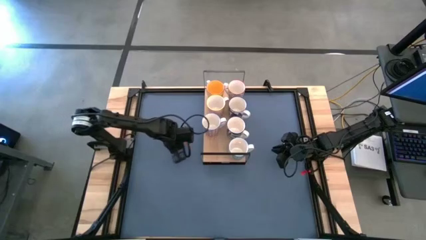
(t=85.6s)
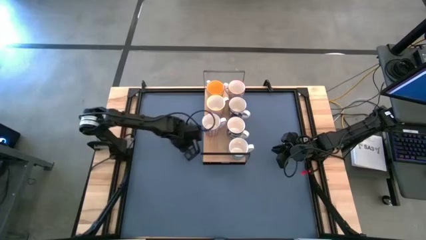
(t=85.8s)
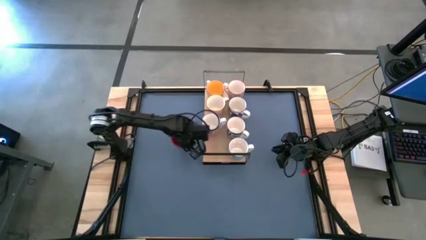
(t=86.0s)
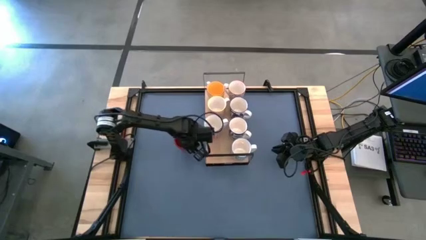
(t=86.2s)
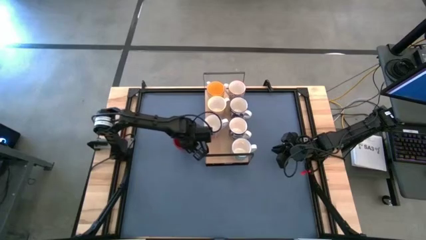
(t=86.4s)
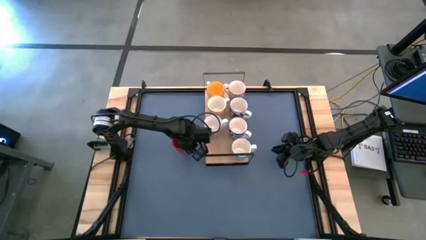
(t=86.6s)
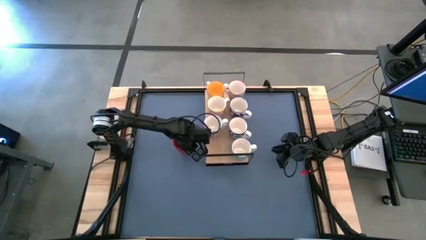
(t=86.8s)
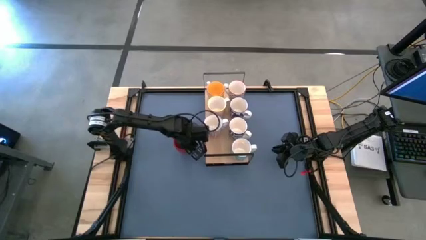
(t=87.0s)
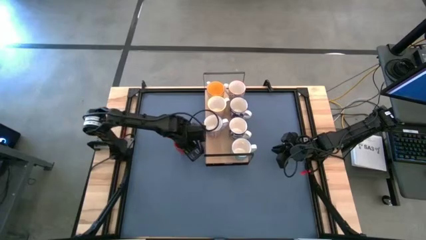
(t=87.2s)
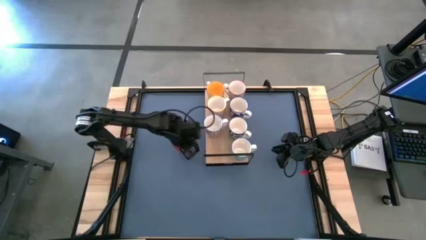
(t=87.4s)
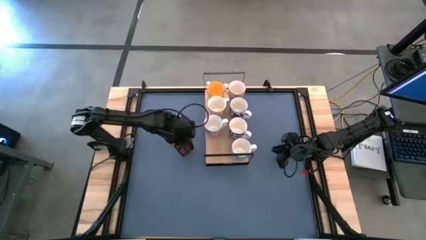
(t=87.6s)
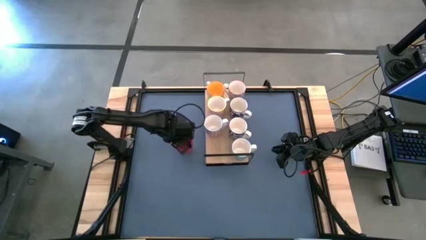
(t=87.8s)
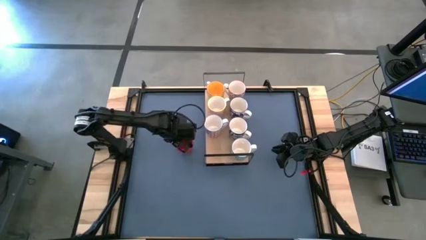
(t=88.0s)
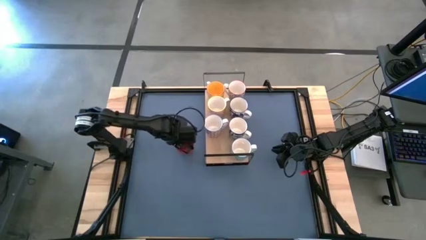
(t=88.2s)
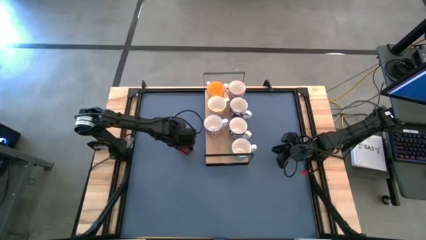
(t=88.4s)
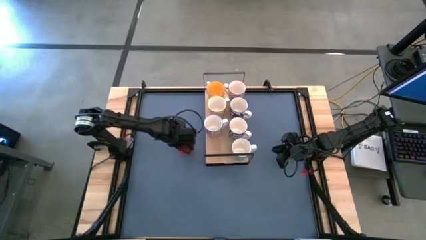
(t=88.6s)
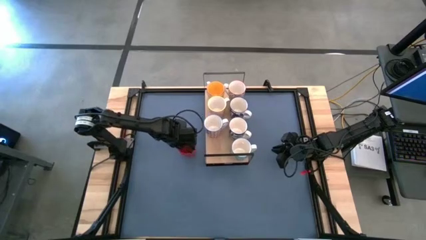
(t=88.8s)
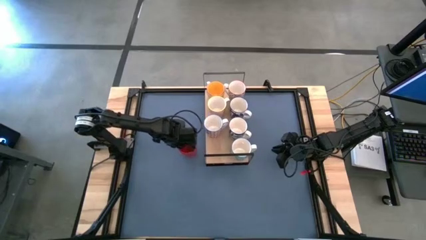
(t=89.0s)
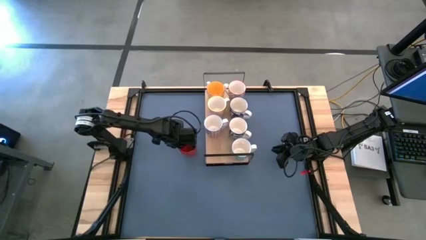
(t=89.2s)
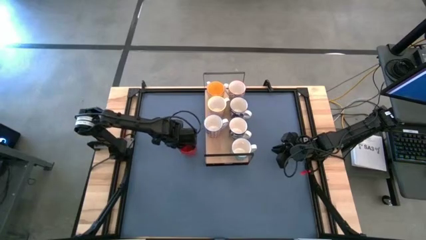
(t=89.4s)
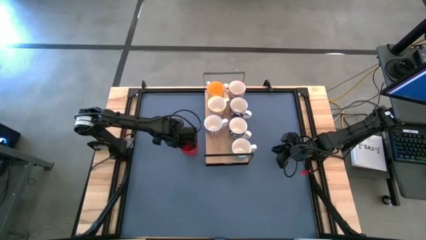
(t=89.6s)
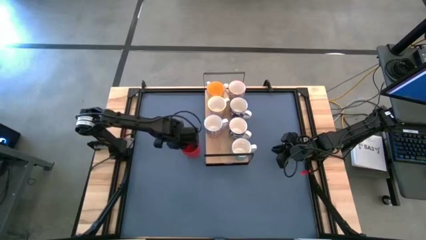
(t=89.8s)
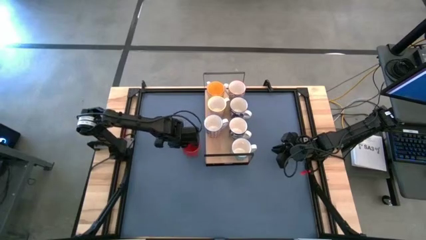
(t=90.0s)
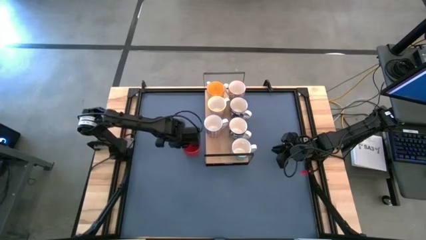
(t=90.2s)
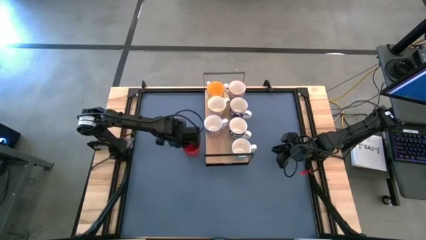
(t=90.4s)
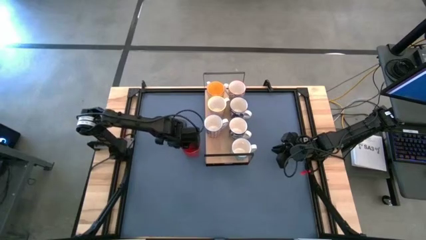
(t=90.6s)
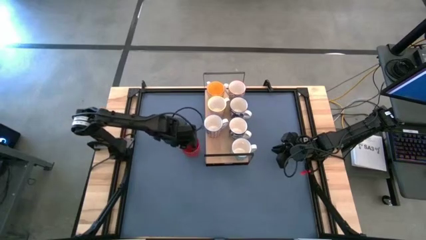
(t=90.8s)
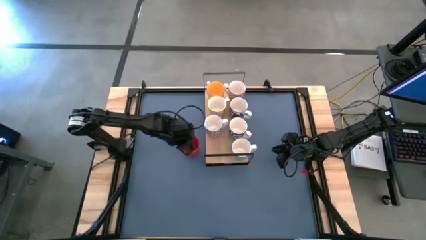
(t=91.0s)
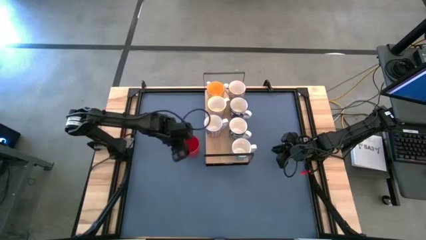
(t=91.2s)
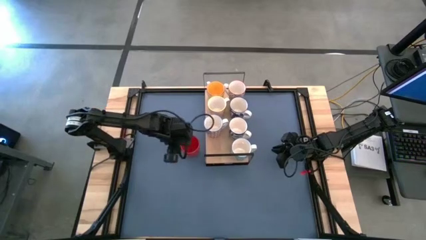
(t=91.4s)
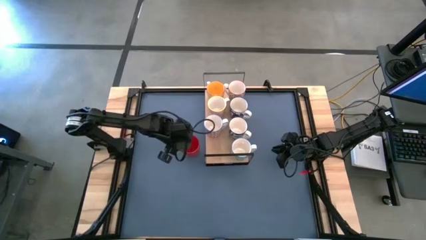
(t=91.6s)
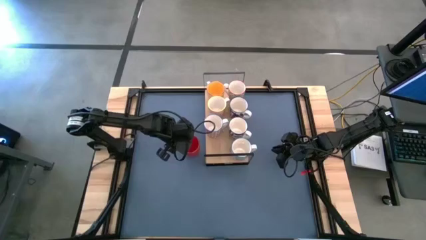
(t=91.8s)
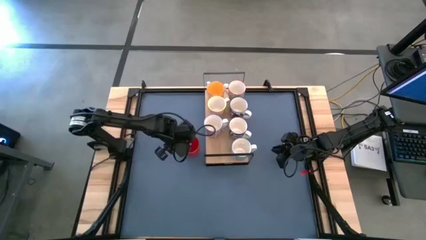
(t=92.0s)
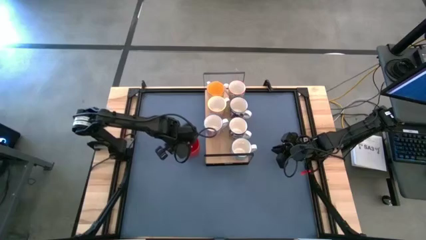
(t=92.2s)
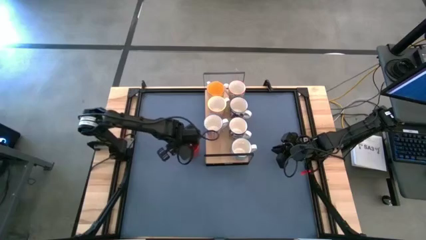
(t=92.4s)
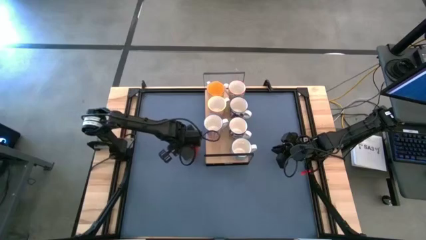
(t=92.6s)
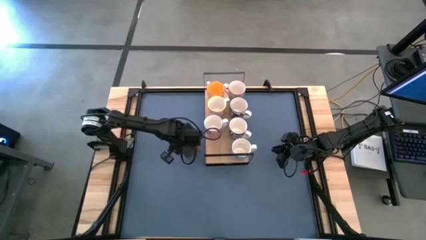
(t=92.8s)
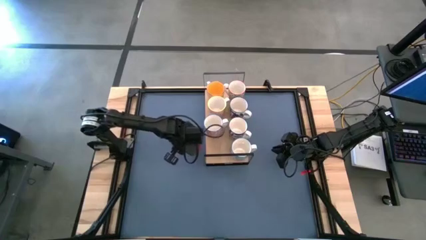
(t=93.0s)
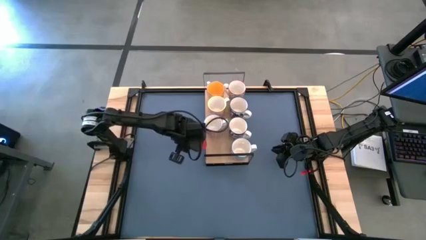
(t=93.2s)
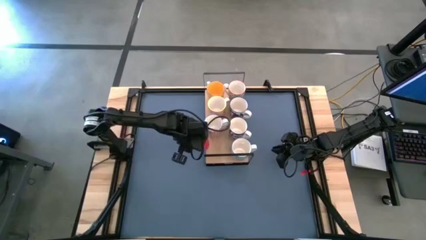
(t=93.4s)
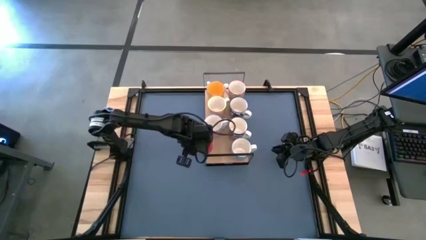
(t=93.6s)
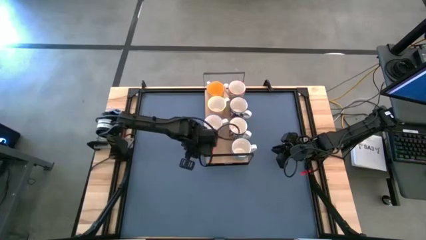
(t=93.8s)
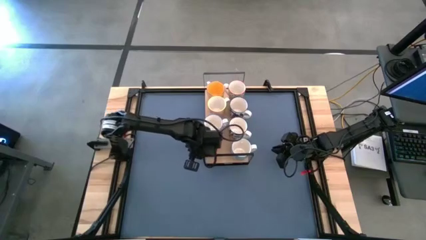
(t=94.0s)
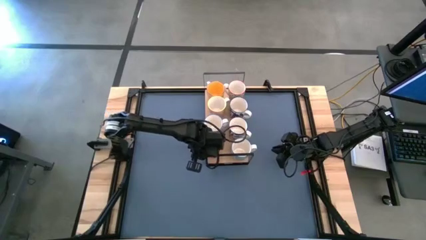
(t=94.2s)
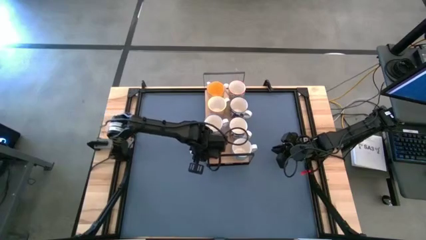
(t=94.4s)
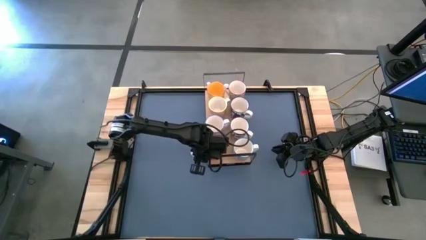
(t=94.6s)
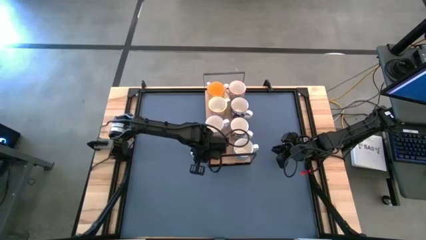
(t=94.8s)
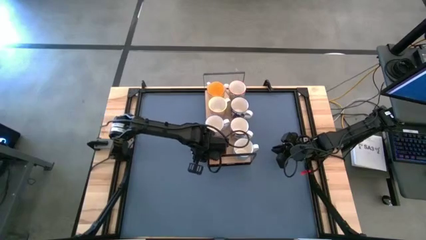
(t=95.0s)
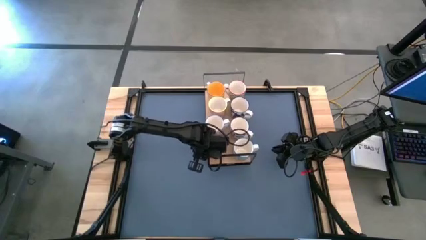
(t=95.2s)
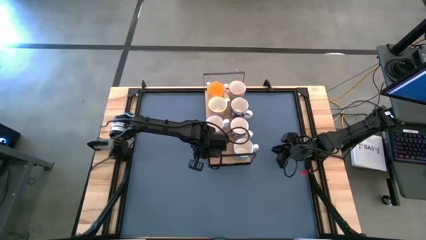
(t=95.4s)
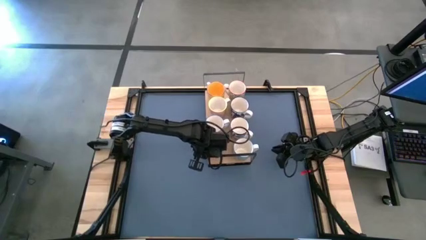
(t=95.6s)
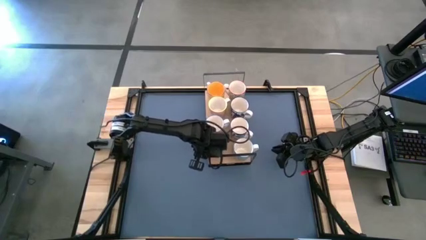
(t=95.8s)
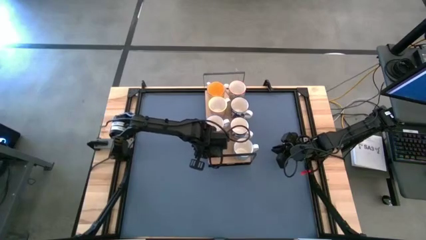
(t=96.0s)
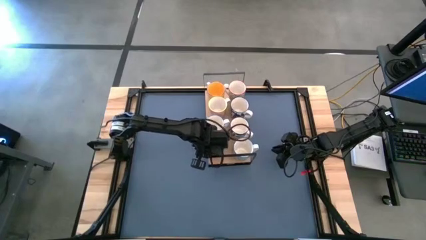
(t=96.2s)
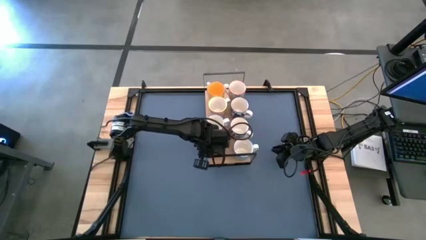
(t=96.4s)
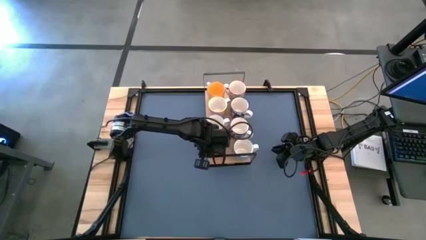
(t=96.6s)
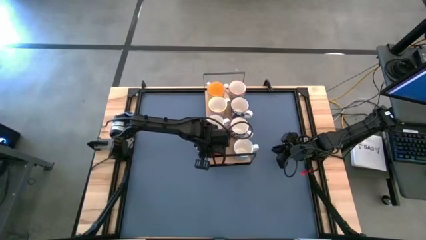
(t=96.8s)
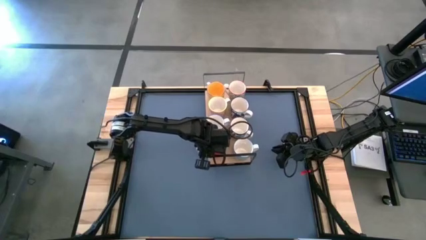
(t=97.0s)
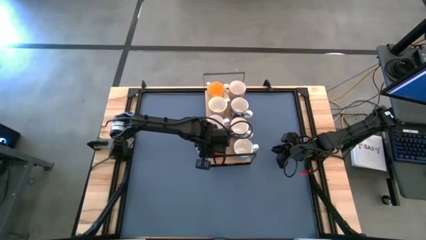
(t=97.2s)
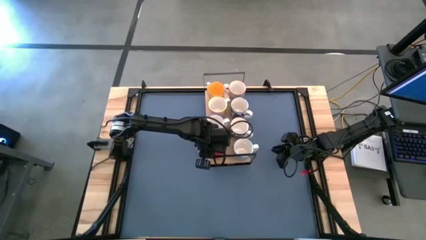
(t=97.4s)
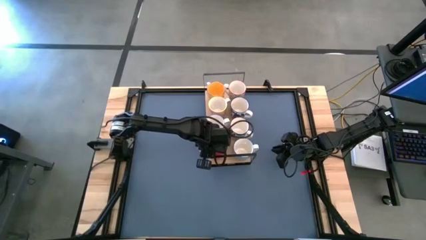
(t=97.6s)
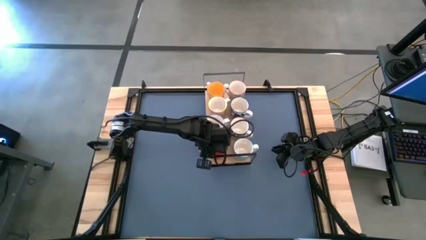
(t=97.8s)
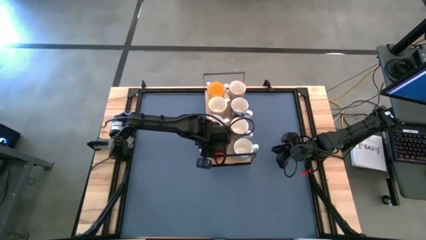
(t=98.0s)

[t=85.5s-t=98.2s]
Task: Place coffee mugs
Put the red mug on the shelf
